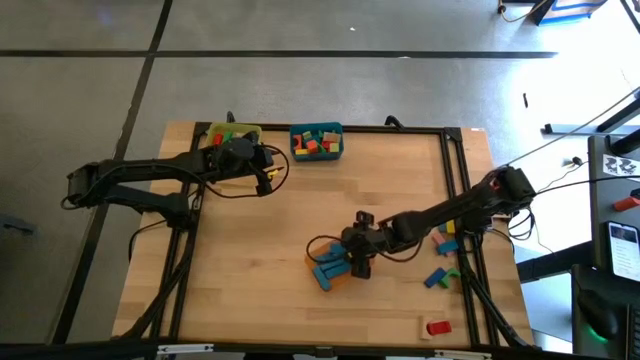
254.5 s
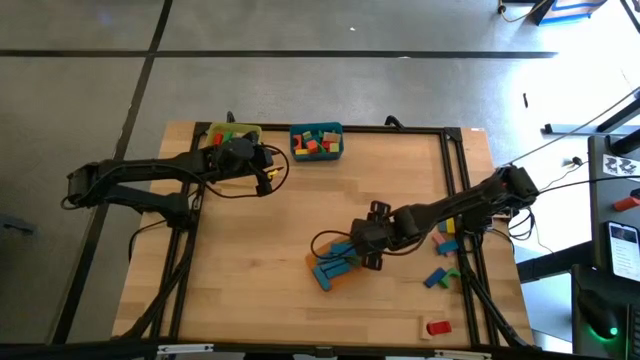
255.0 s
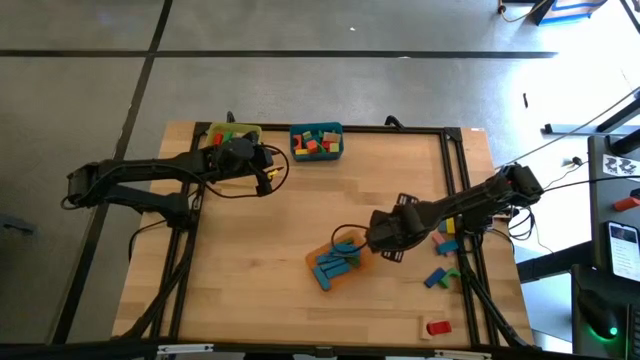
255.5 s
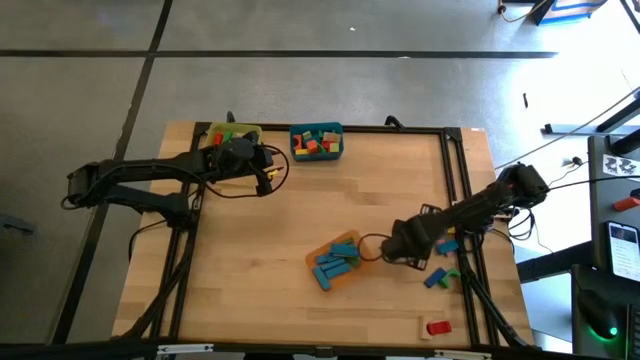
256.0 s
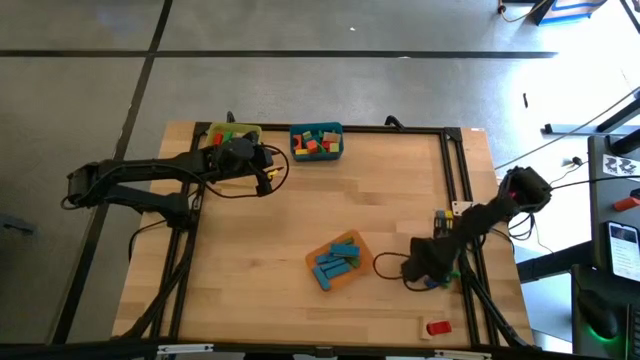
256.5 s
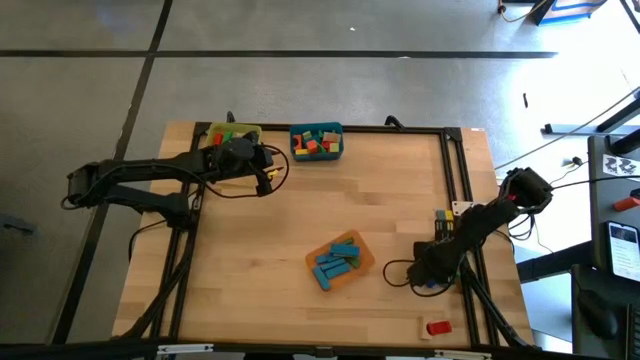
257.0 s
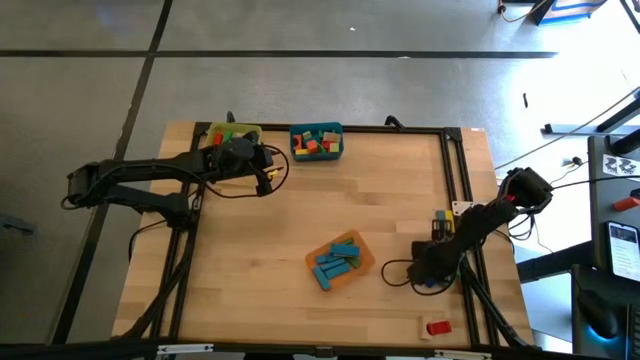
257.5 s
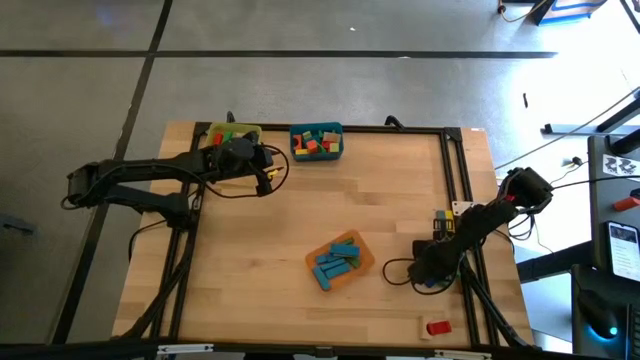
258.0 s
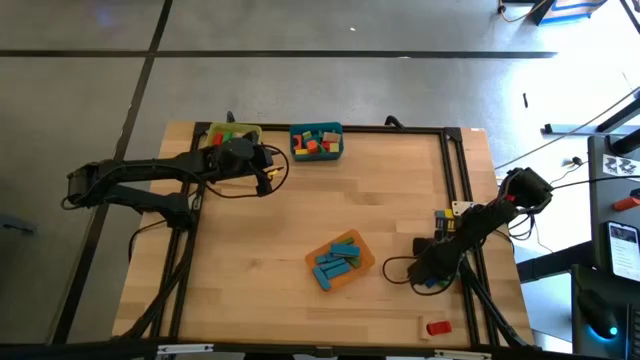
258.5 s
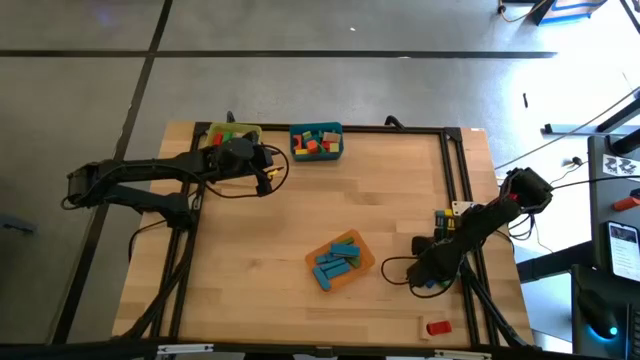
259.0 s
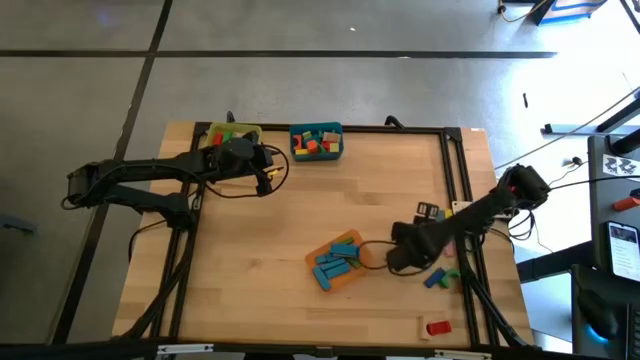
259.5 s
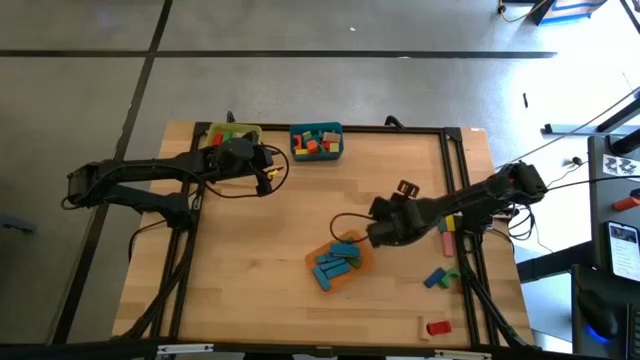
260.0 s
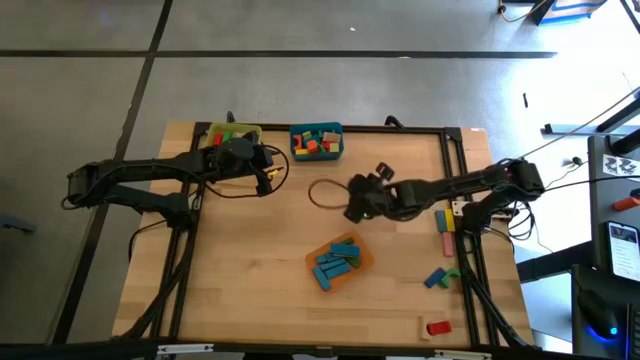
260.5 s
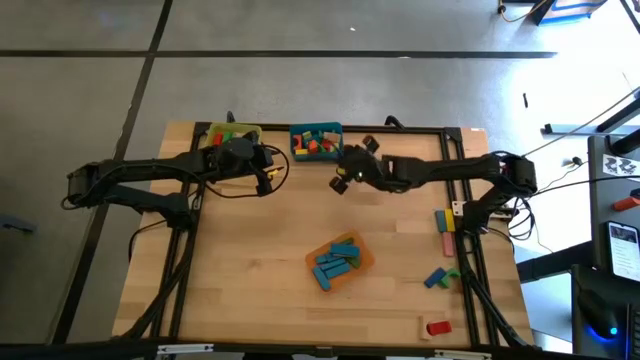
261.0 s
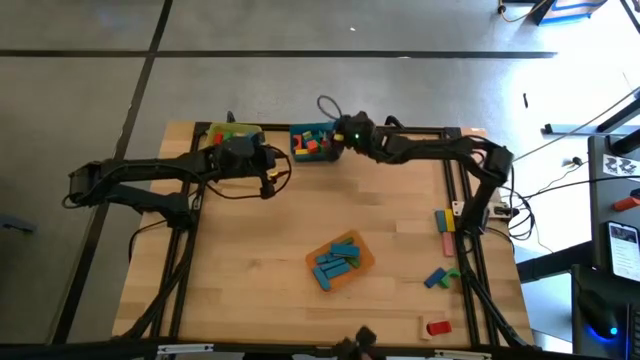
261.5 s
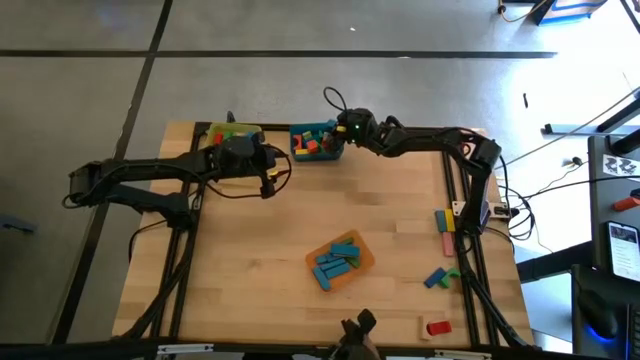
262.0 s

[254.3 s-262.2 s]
Task: Sort blocks by size
Put the blue arch block into the blue bin

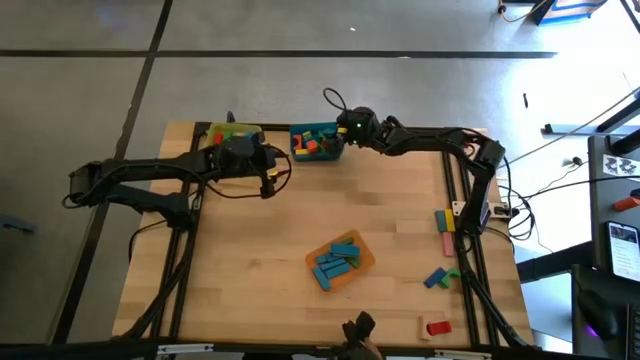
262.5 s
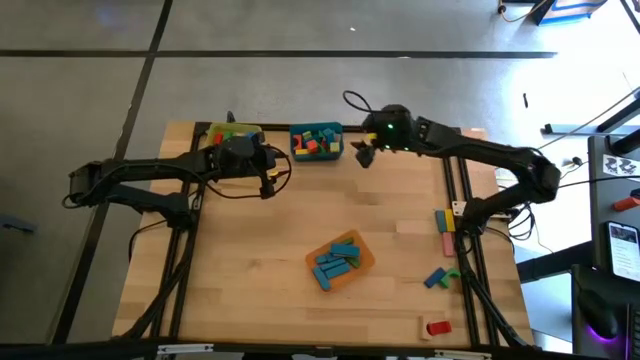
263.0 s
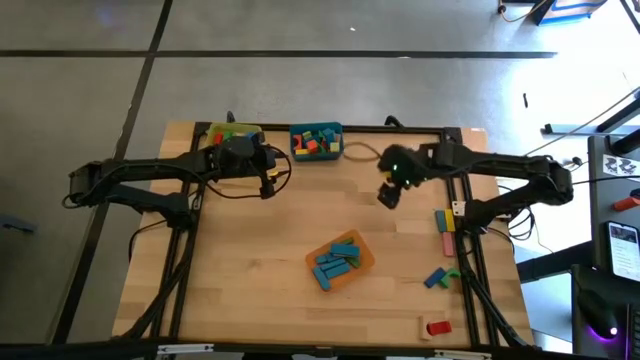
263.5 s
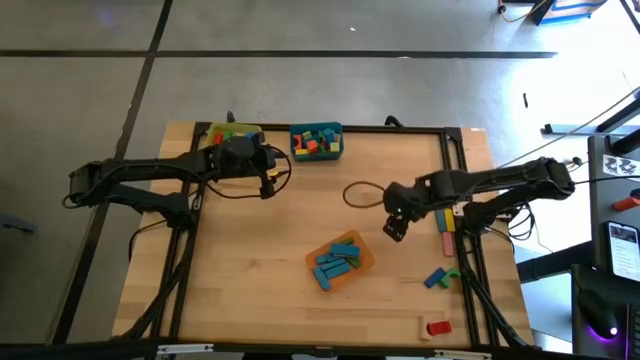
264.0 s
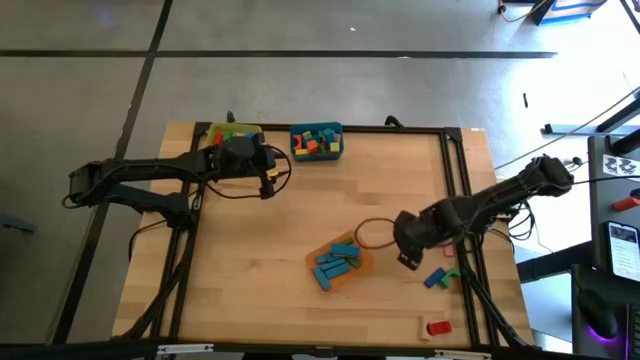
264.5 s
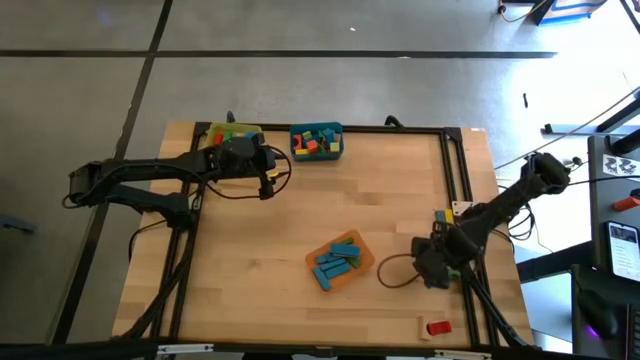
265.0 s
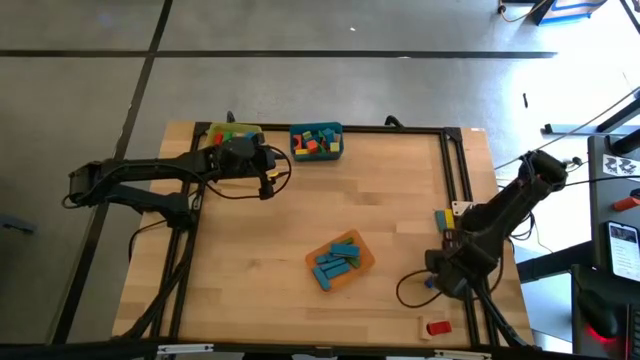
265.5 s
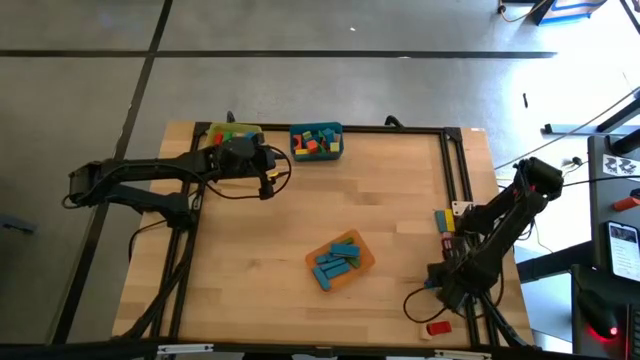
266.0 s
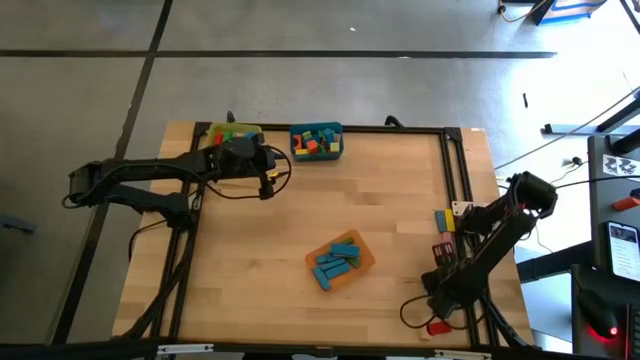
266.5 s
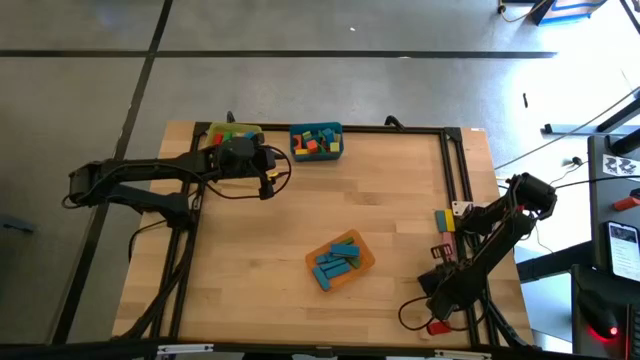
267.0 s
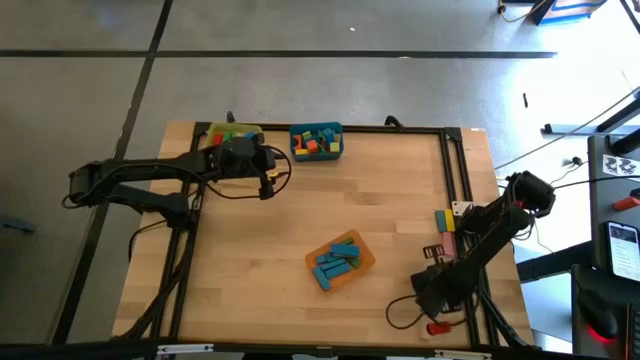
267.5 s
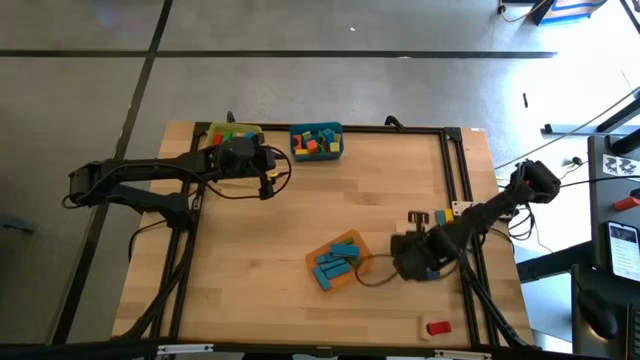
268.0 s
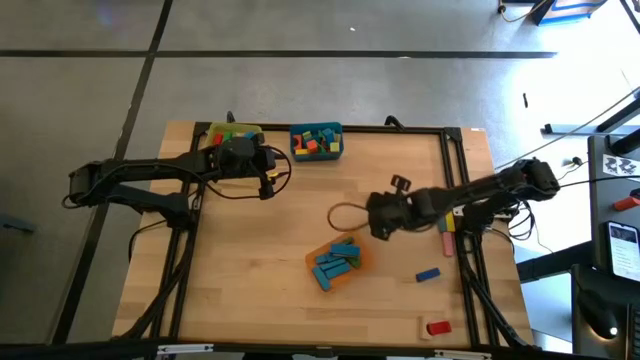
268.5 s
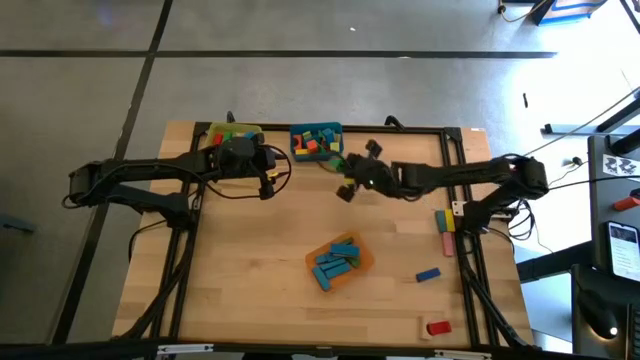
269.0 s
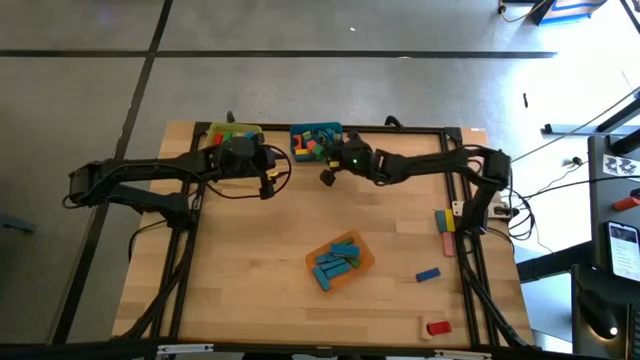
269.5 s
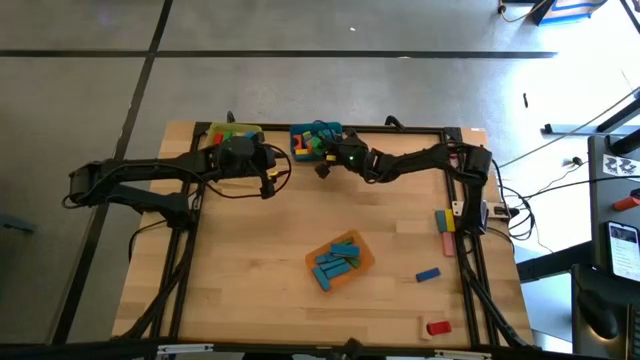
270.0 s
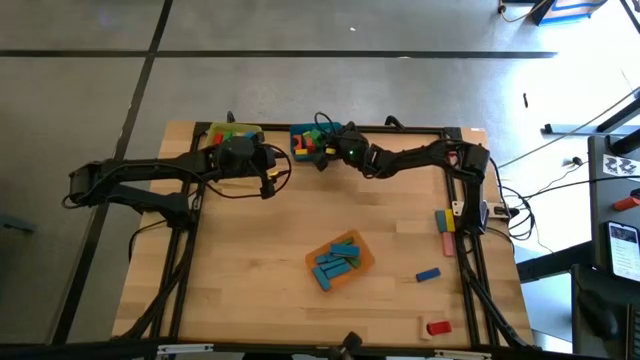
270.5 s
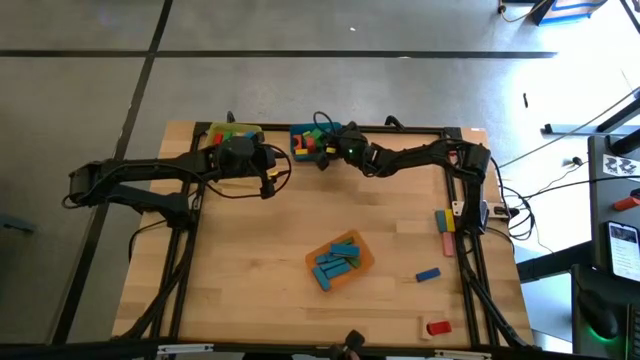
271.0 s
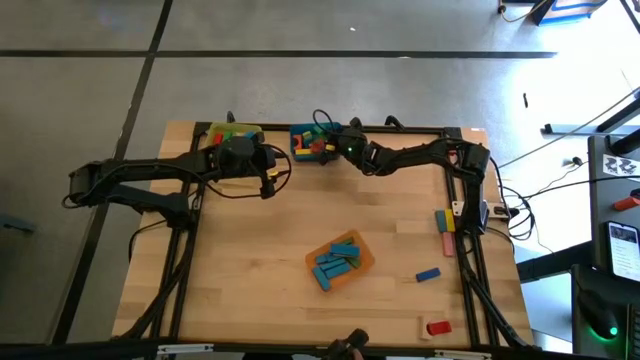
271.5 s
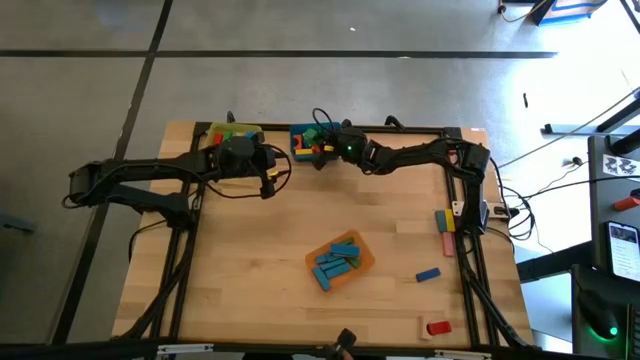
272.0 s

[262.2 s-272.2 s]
Put the green arch block into the blue bin

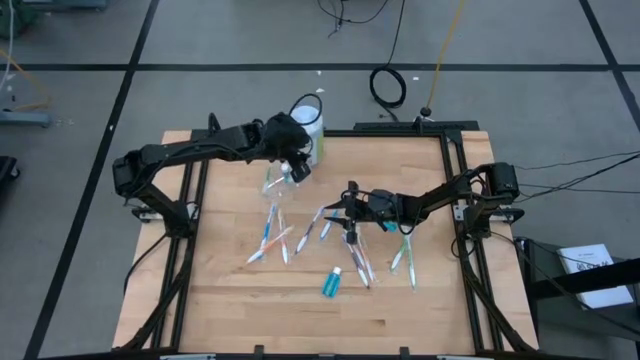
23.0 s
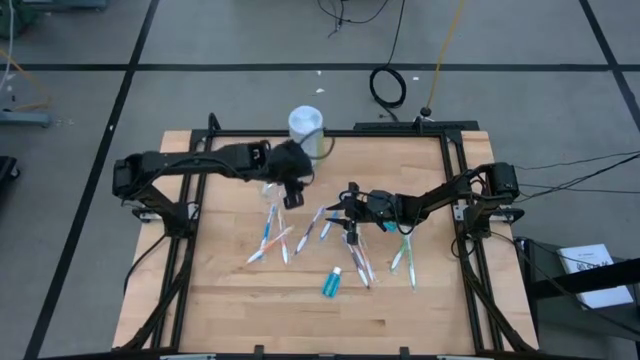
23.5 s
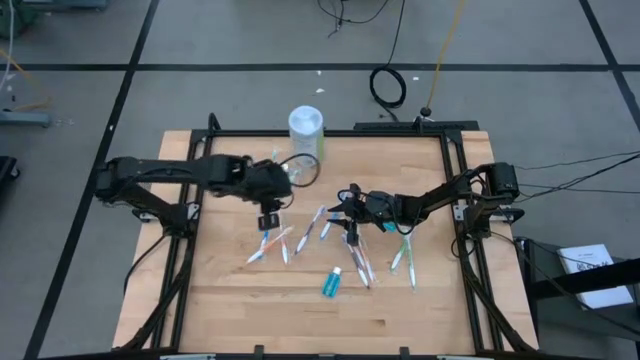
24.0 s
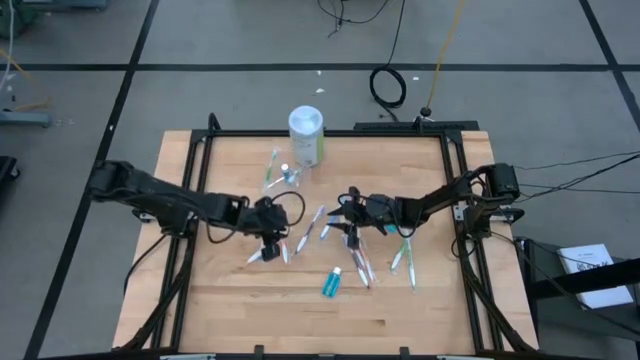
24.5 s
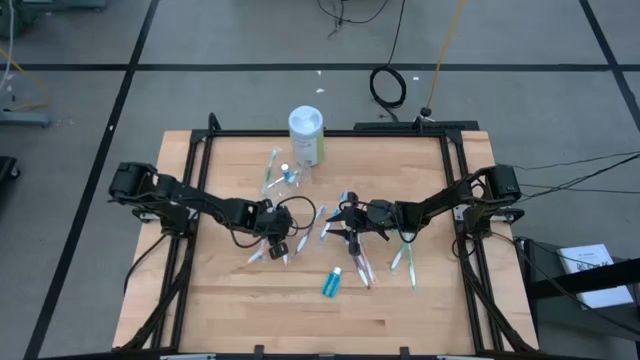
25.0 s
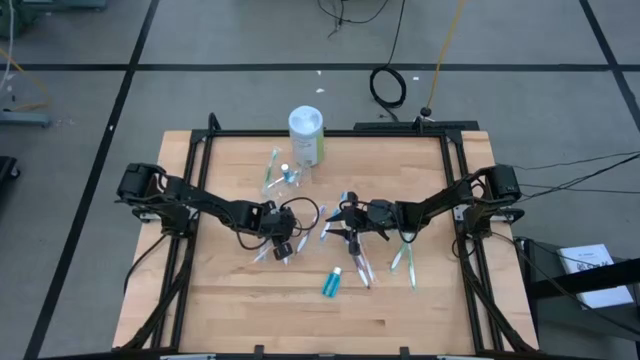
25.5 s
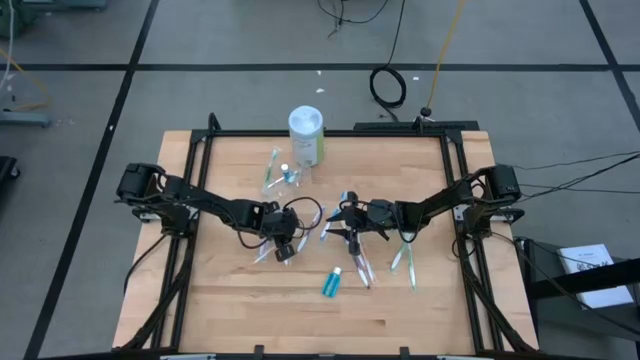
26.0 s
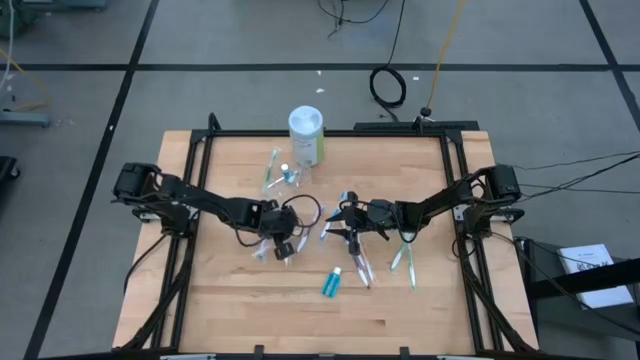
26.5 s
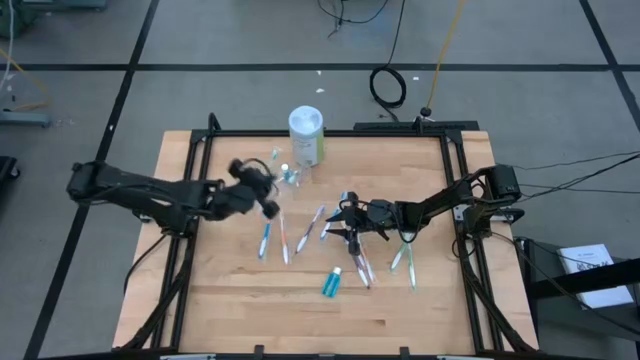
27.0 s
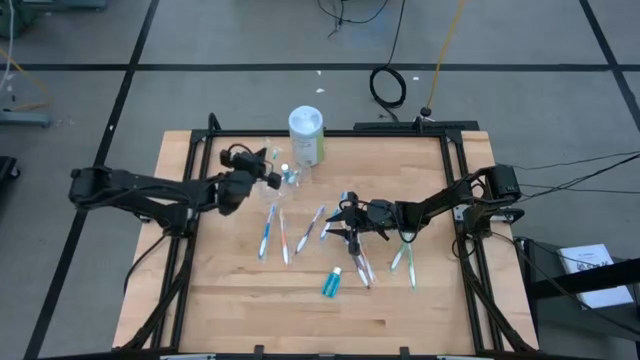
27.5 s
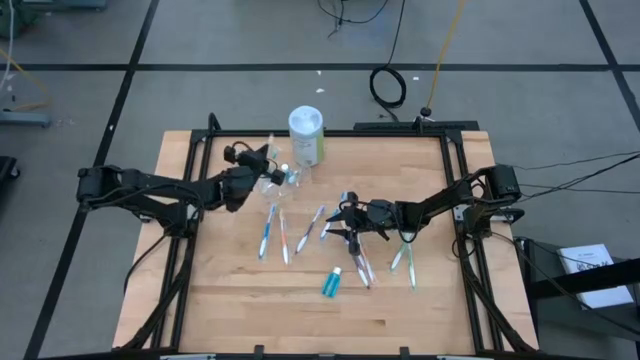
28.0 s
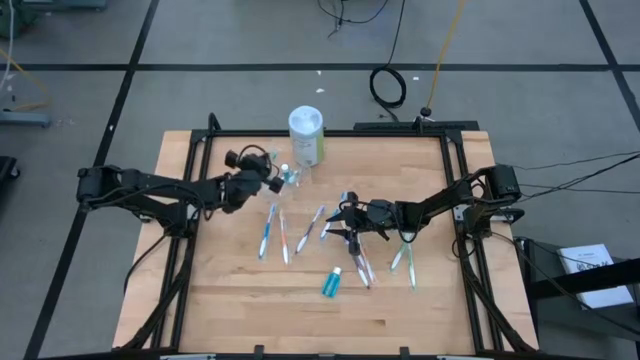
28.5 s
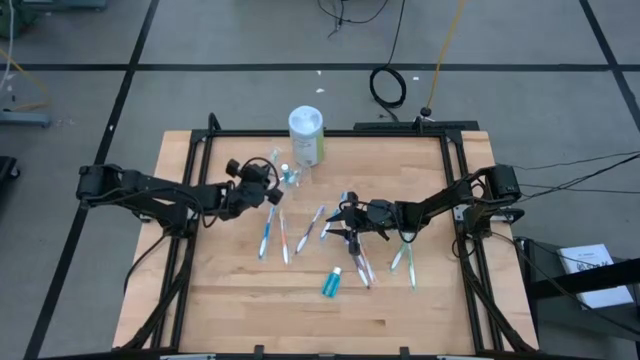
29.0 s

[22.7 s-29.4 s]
Task: Pick & Place toothbrushing station
Put the orange toothbrush into the transparent organizer
